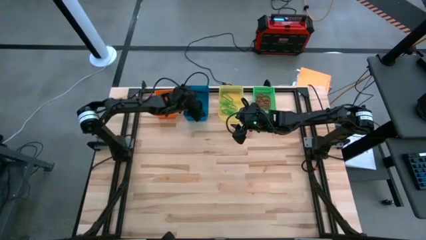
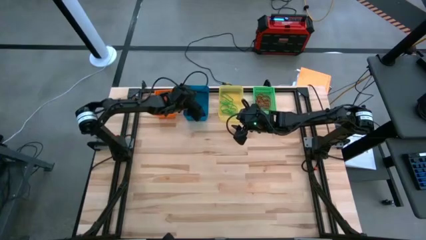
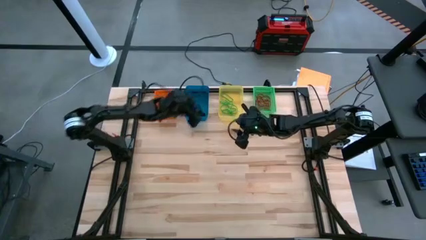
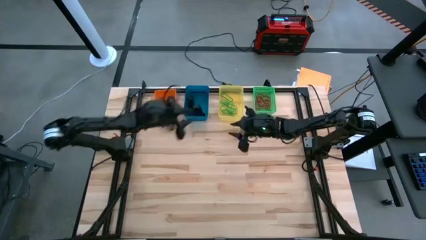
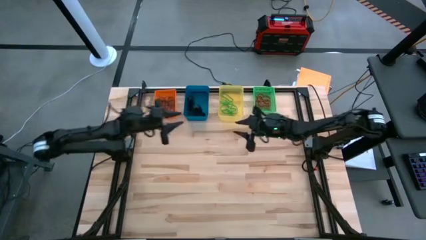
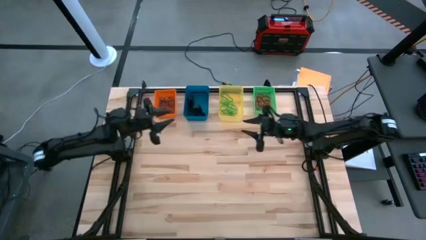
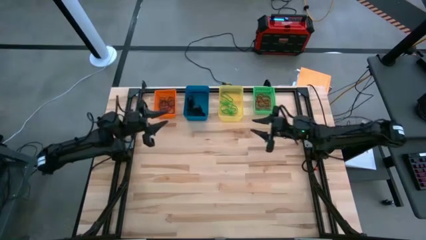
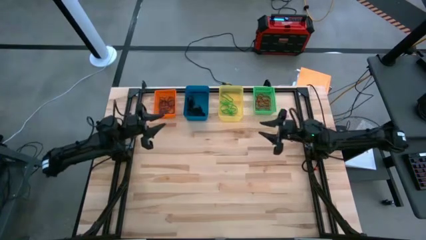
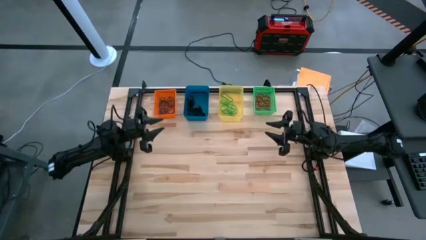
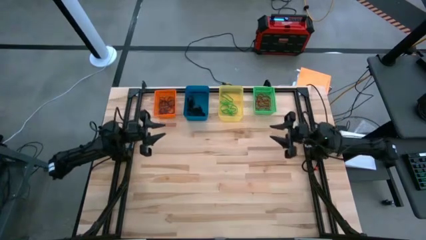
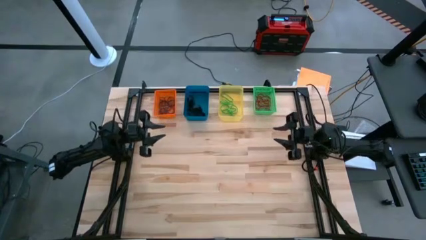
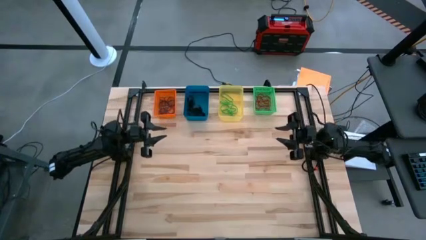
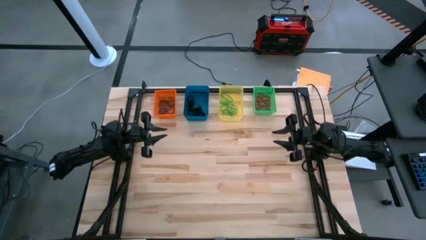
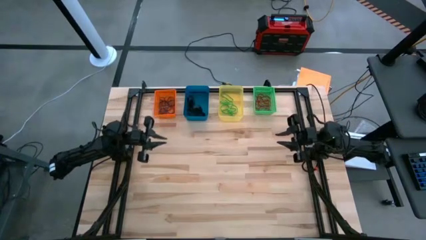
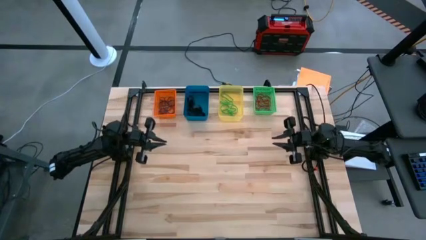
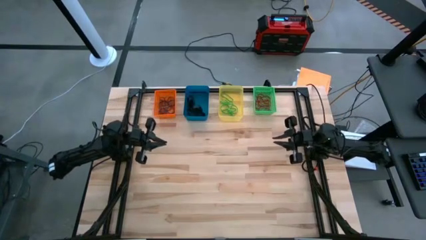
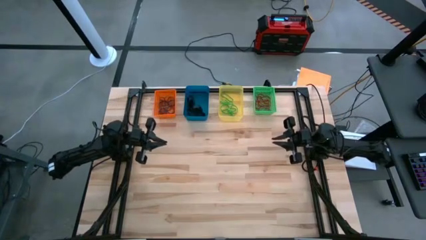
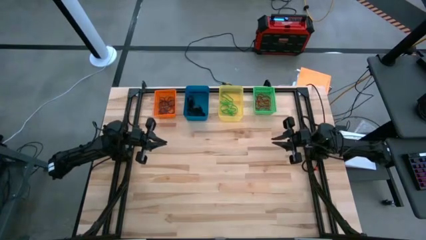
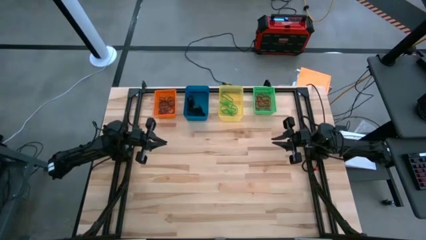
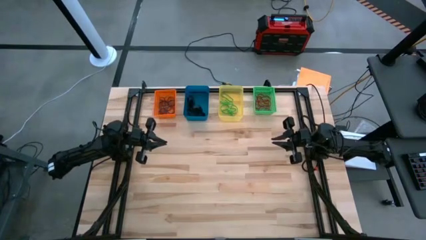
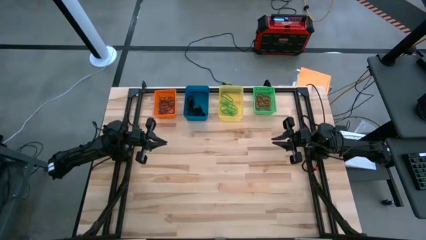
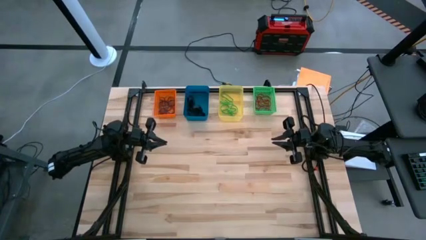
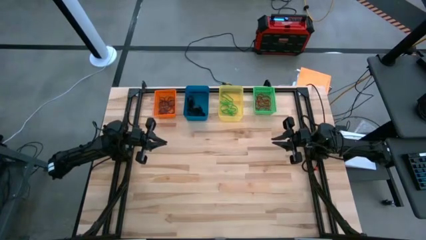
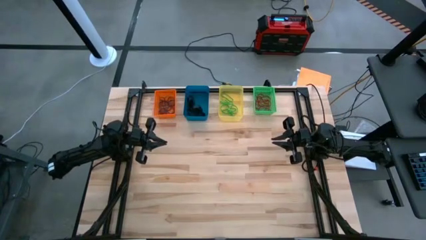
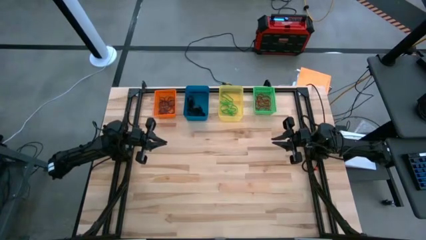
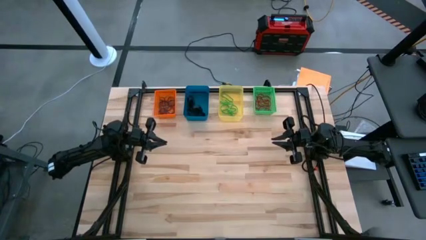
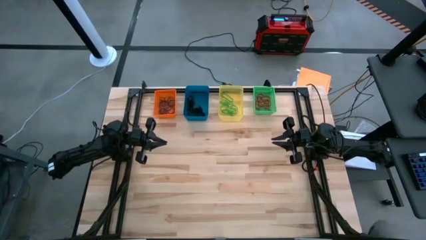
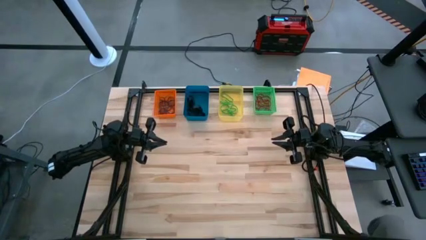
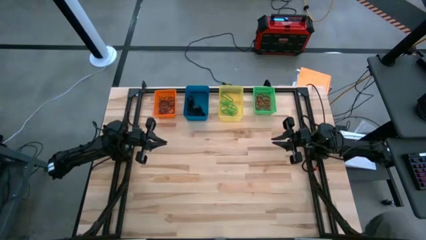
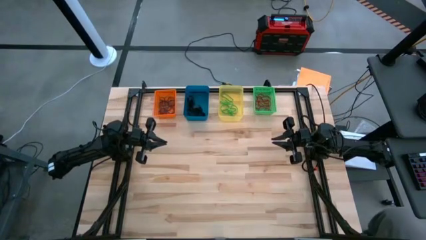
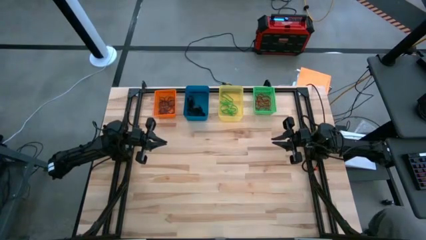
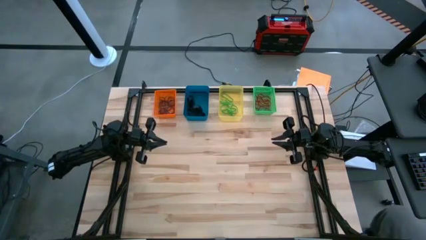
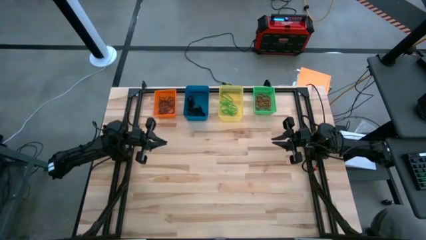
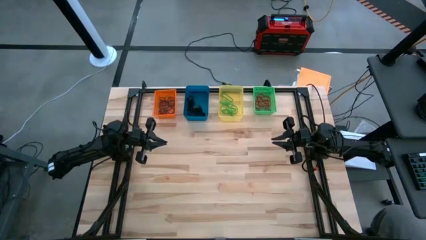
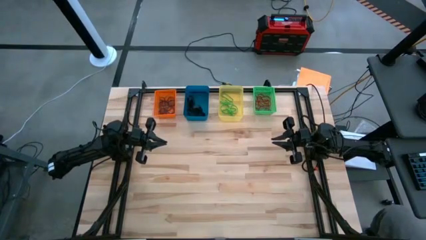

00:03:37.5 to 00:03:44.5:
Task: Sort rubber bands into baskets
Return to Home Position
